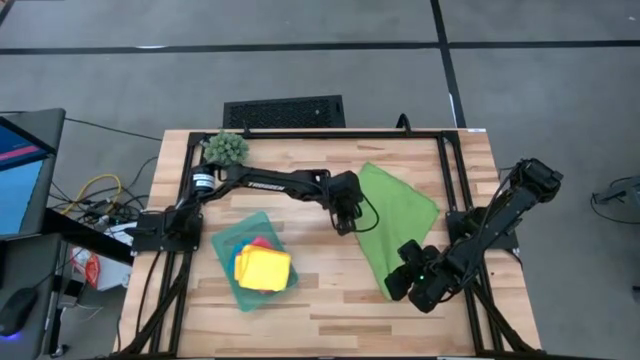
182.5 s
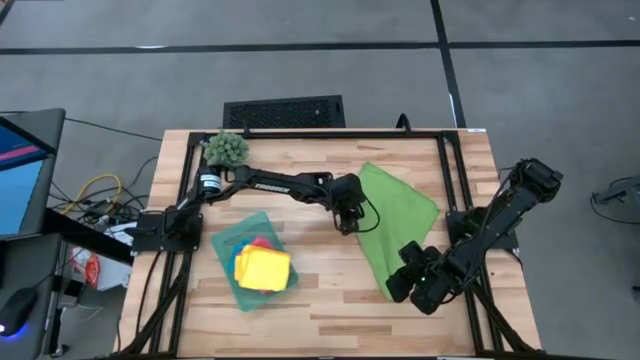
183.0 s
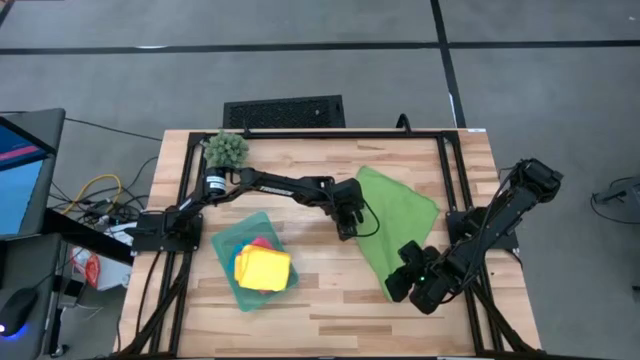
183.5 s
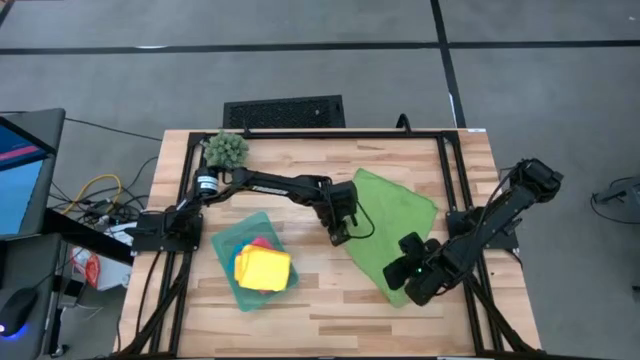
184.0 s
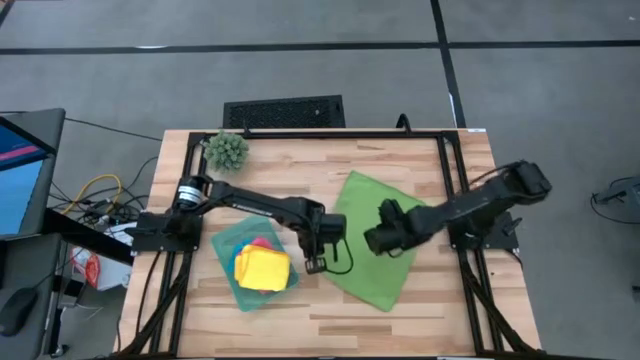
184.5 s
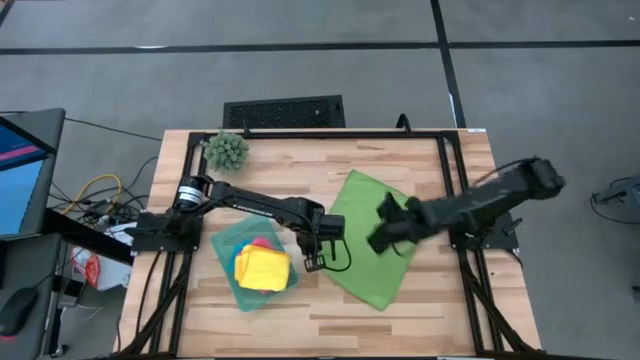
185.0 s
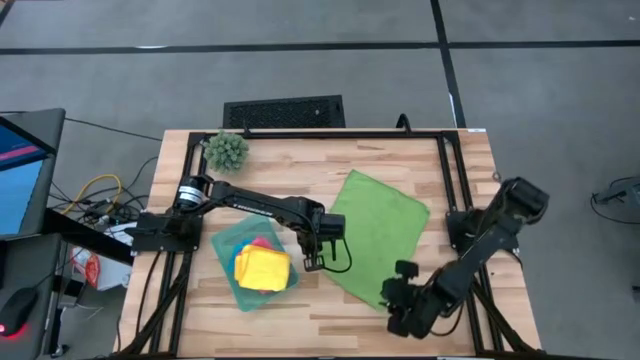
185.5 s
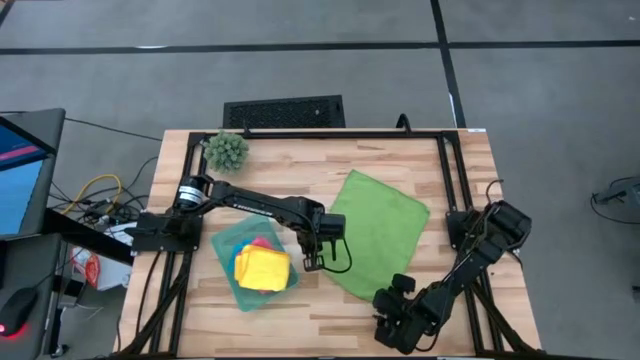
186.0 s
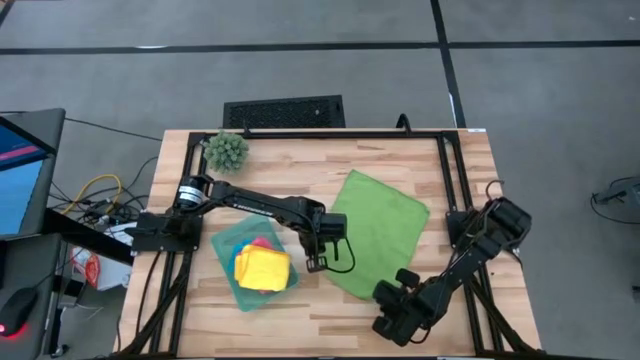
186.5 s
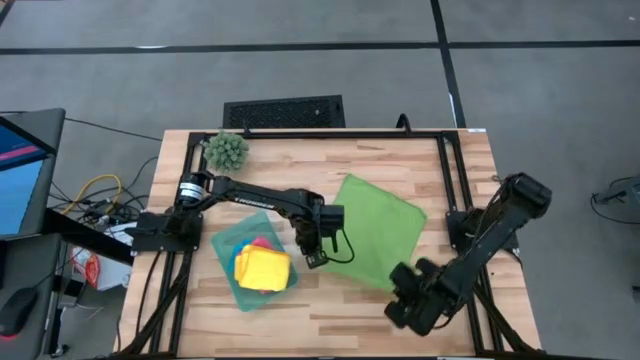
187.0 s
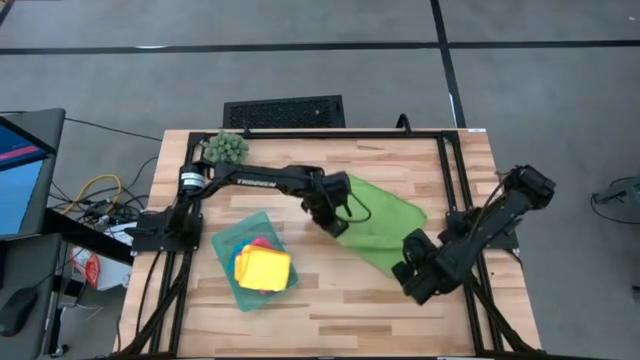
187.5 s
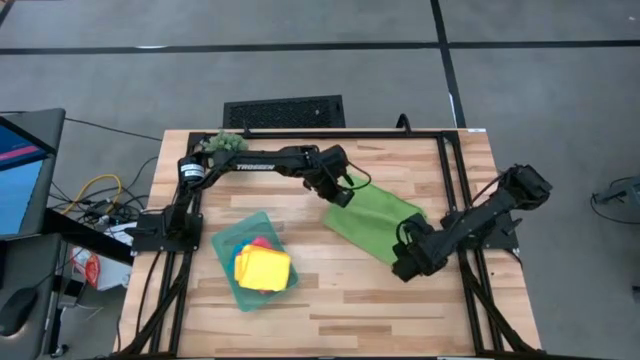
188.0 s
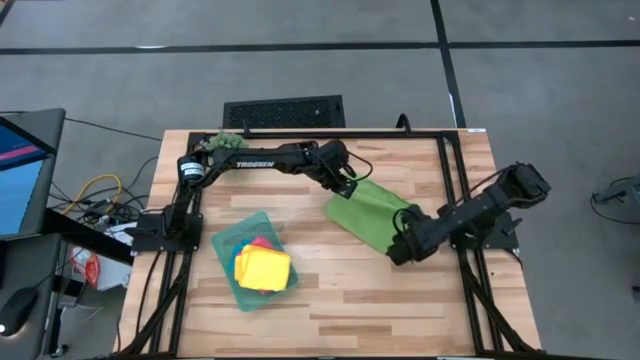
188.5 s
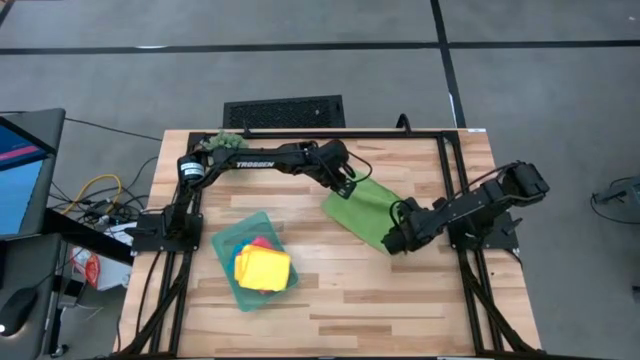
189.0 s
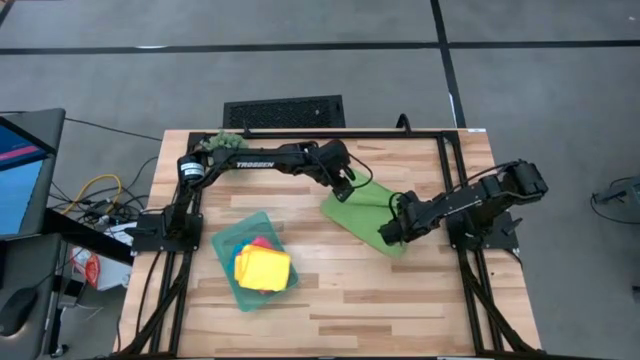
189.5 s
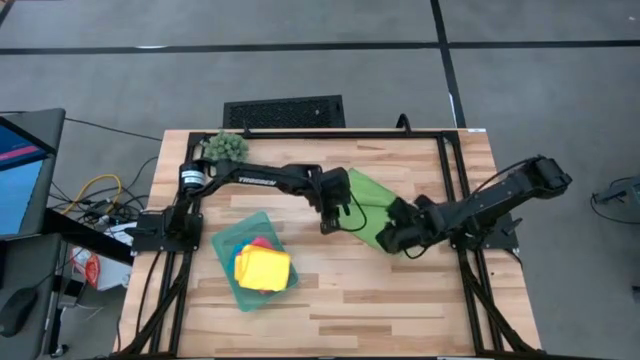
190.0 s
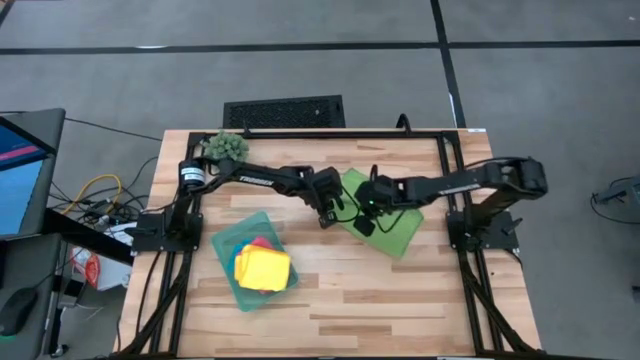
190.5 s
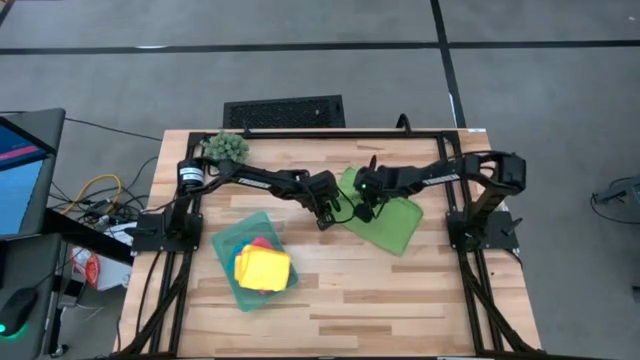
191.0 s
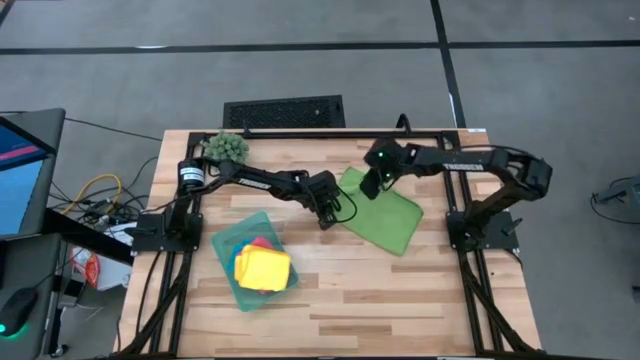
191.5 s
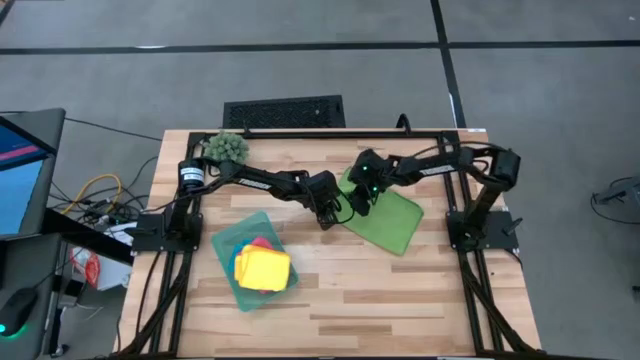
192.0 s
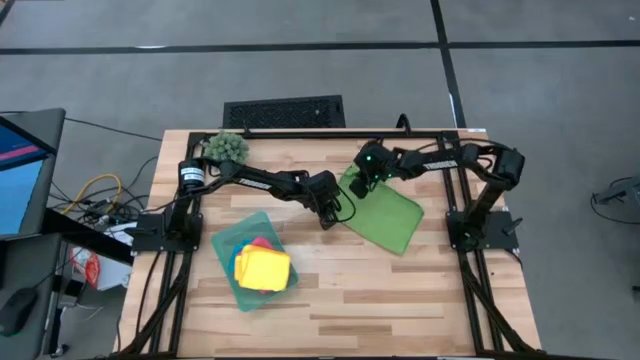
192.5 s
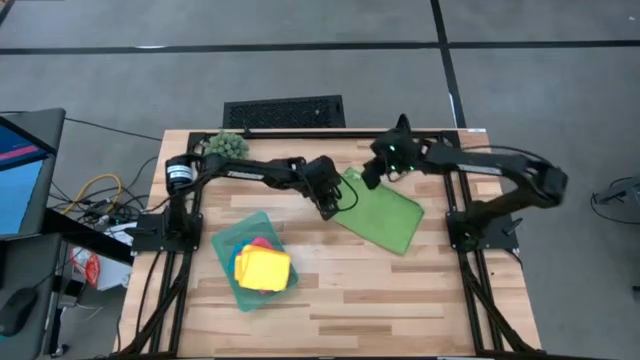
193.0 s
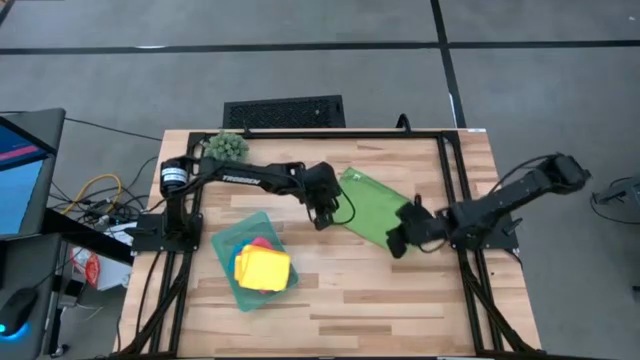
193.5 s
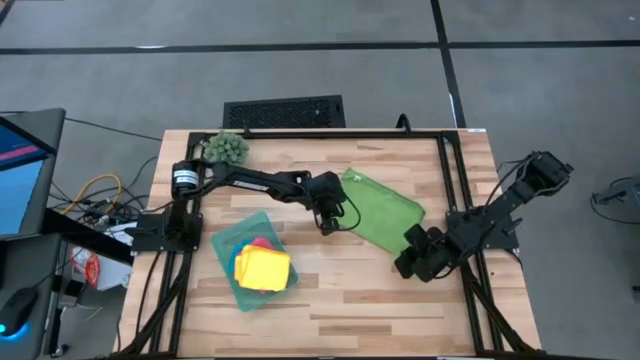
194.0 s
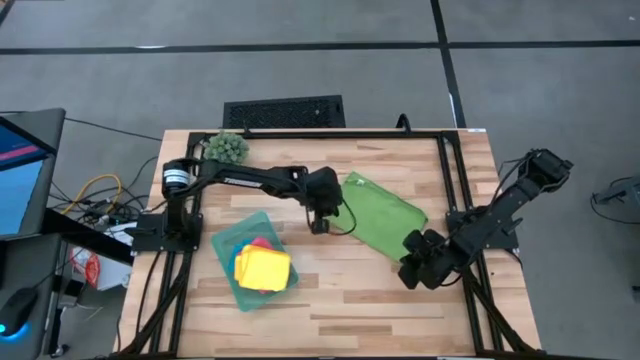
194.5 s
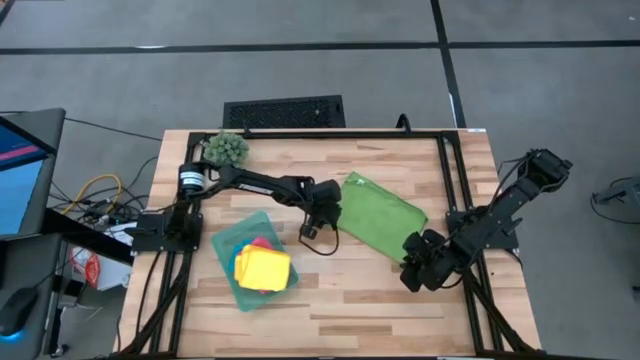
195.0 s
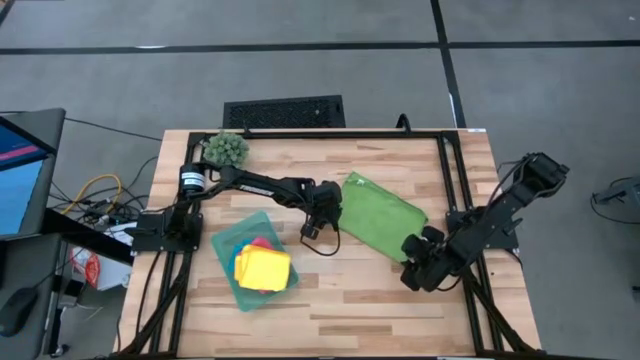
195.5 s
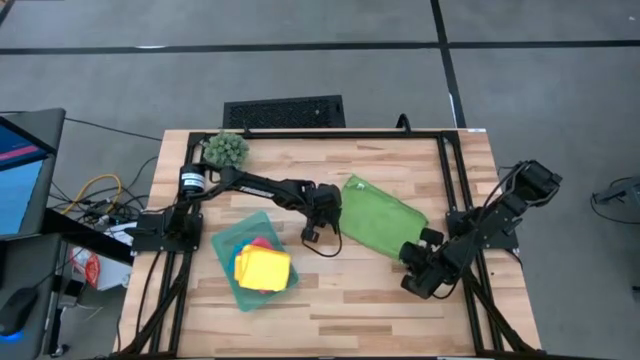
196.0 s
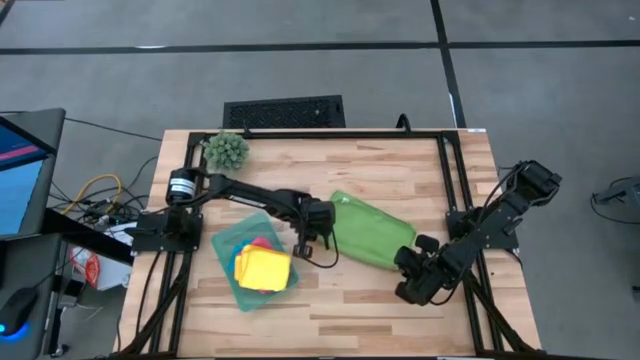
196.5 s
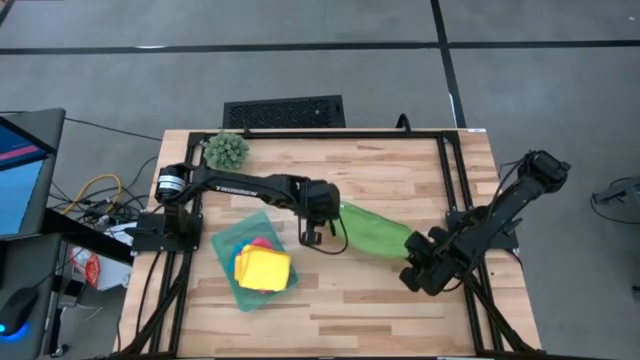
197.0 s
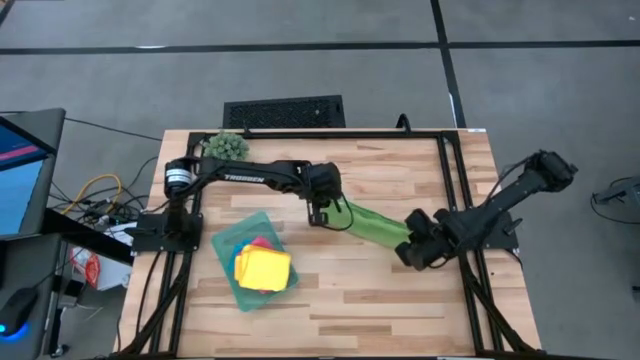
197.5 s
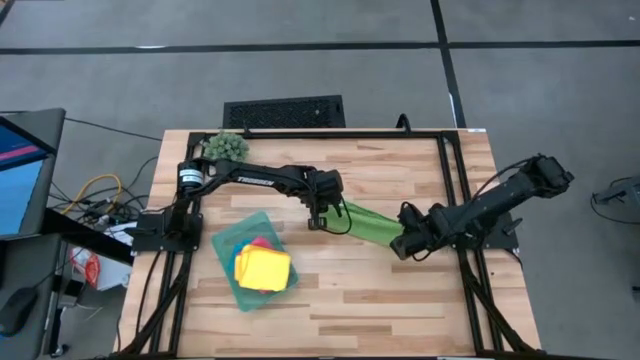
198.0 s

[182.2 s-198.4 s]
Task: Fold microfiber towels
Fold the green microfiber towel

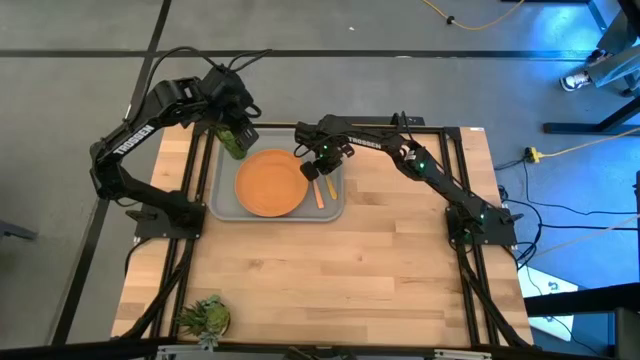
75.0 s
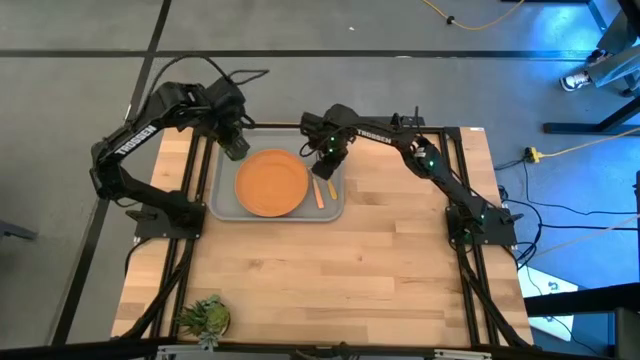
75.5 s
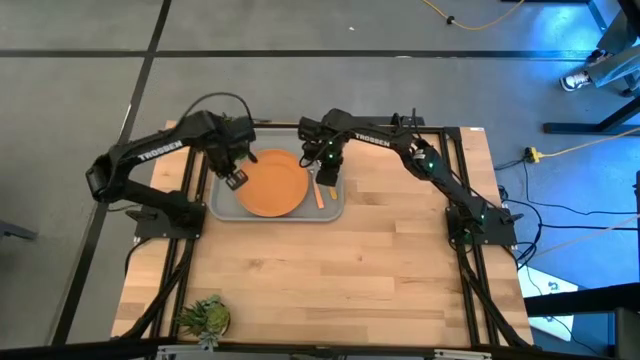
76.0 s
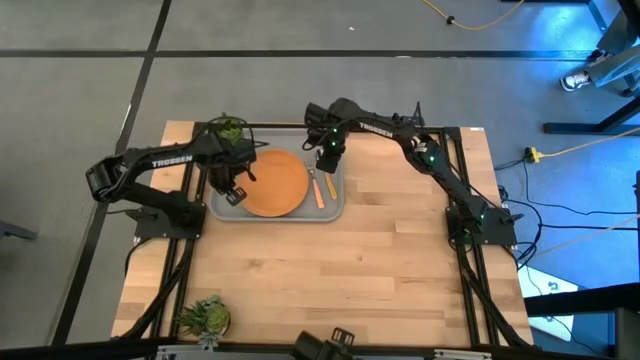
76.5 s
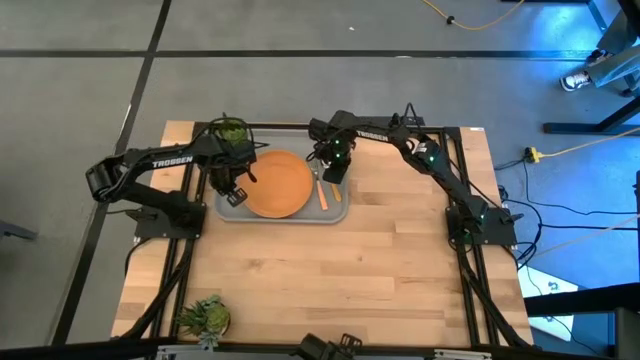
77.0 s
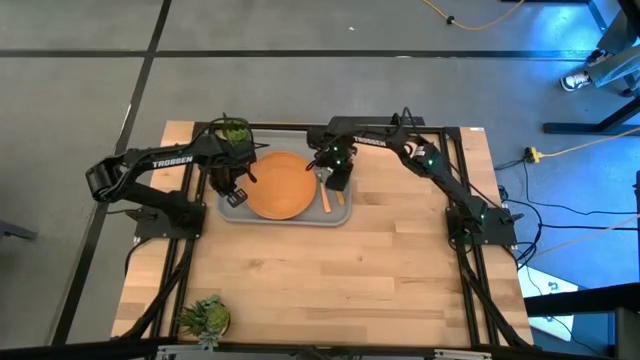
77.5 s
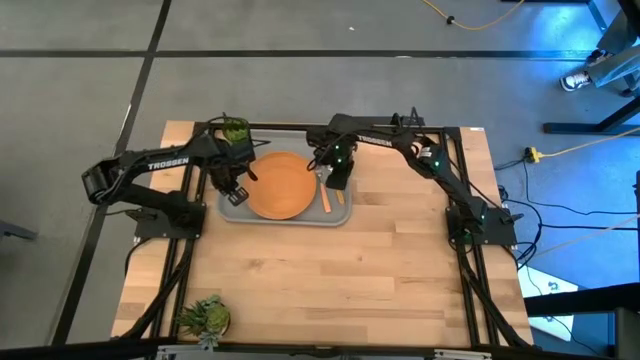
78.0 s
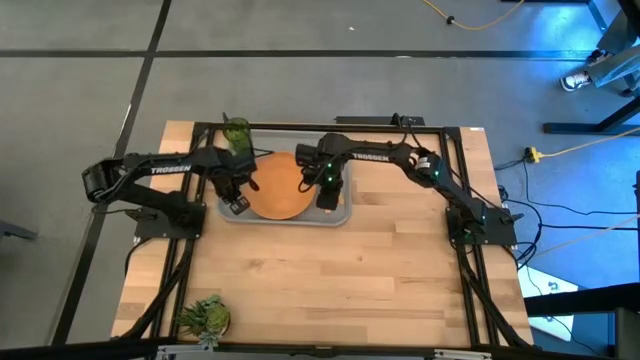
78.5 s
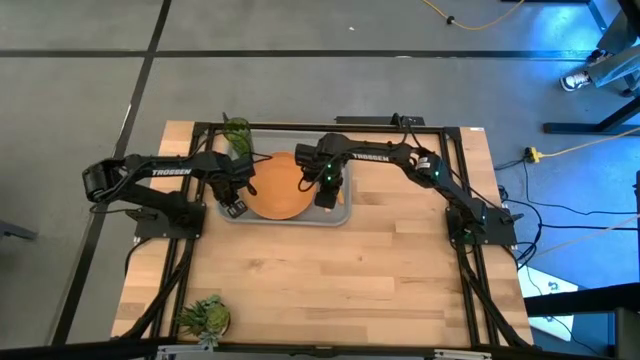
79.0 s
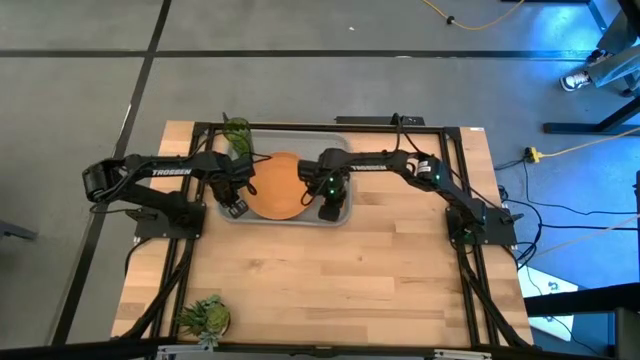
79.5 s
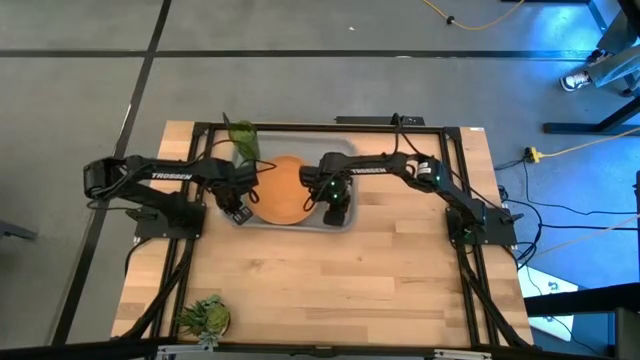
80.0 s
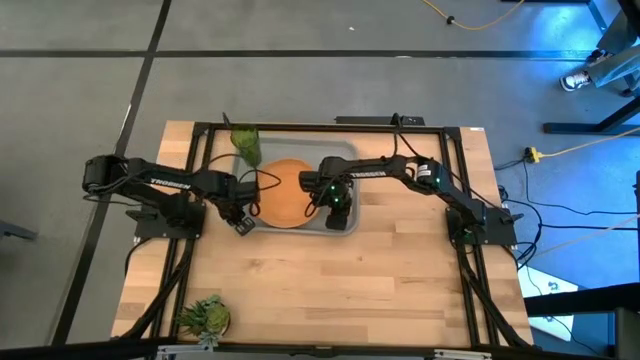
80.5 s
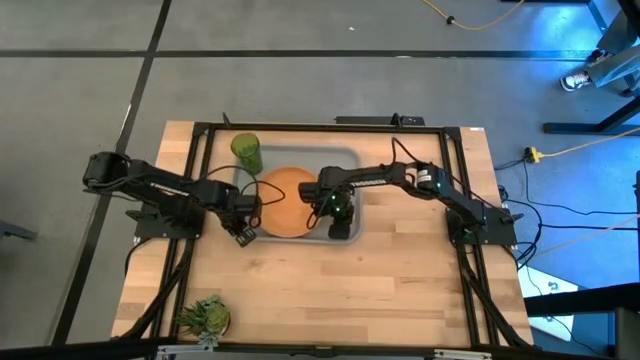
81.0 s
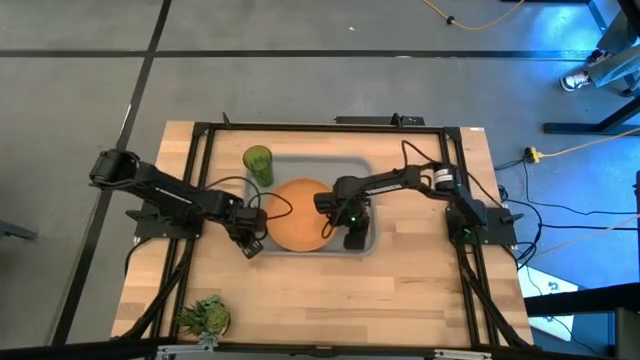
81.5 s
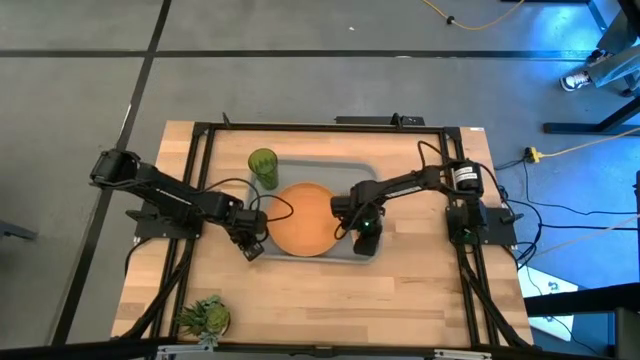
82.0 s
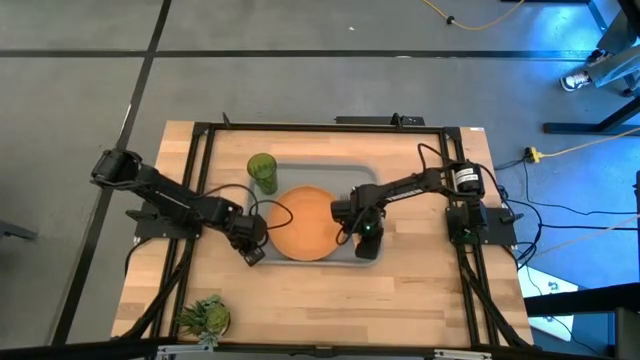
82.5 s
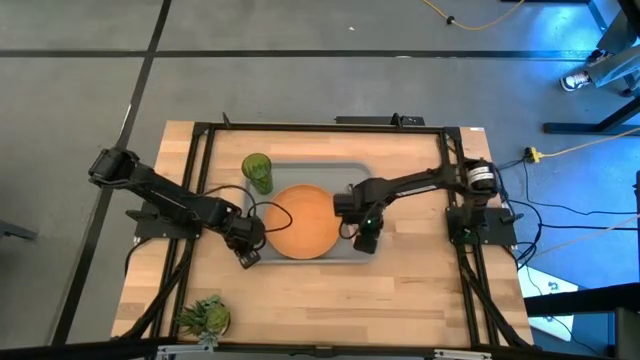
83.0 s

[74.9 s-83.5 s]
Task: Pick and place plate/cup/fork/spoon on tray
Move the gray serving tray to the center of the table
